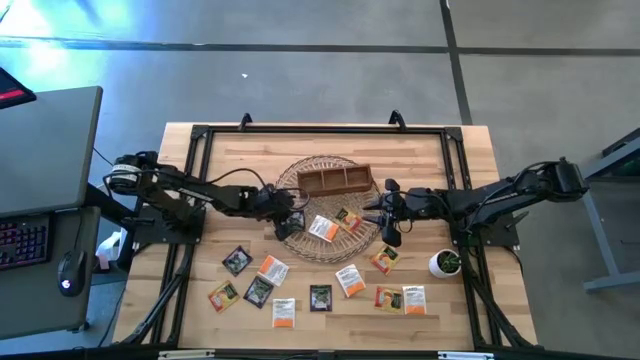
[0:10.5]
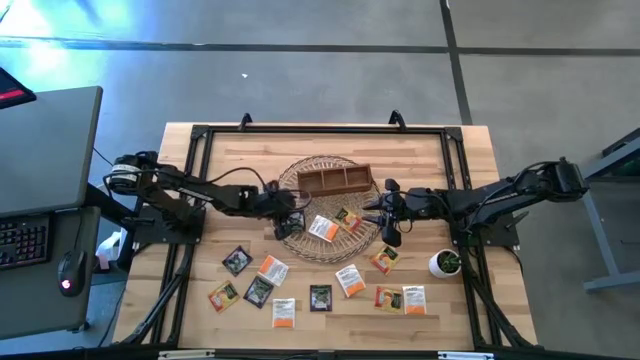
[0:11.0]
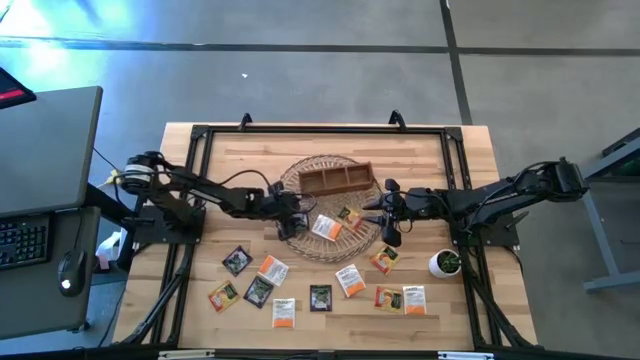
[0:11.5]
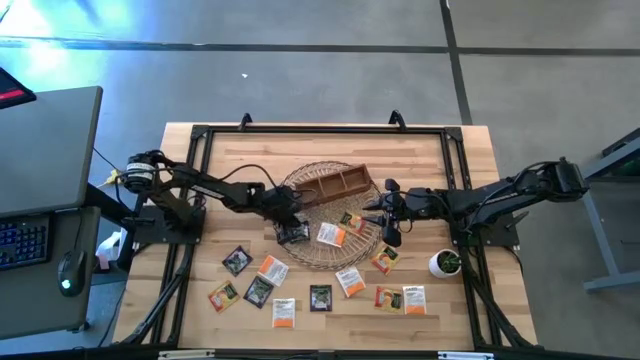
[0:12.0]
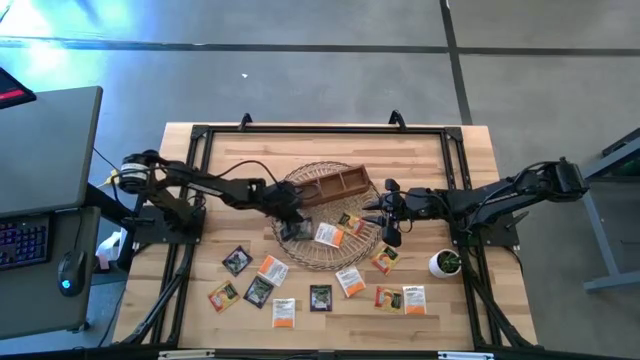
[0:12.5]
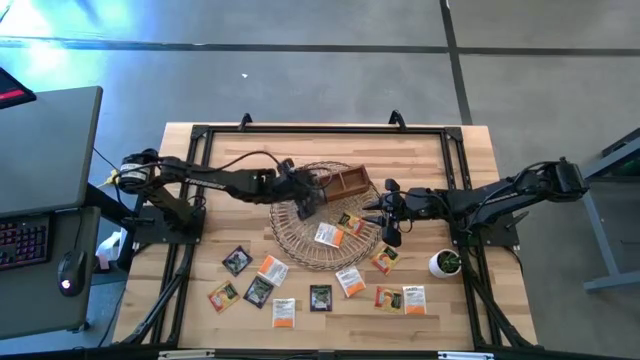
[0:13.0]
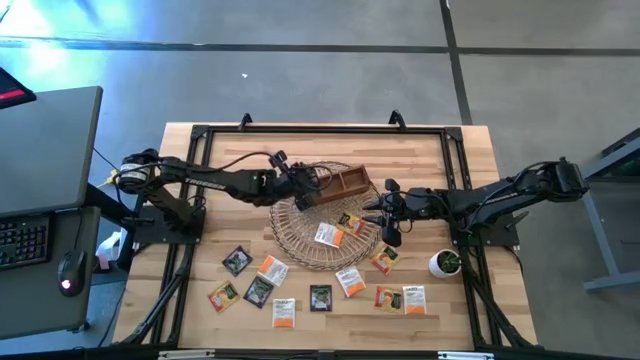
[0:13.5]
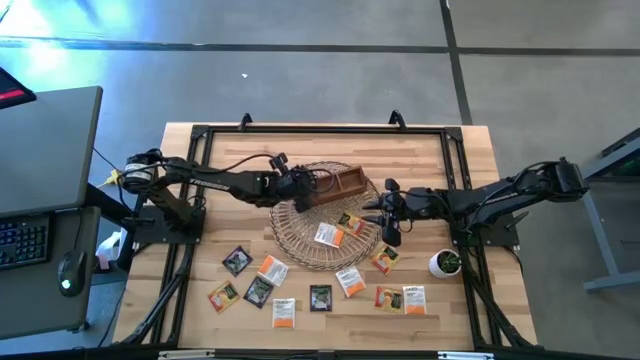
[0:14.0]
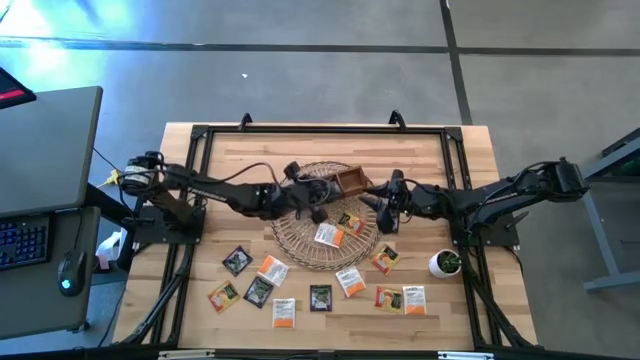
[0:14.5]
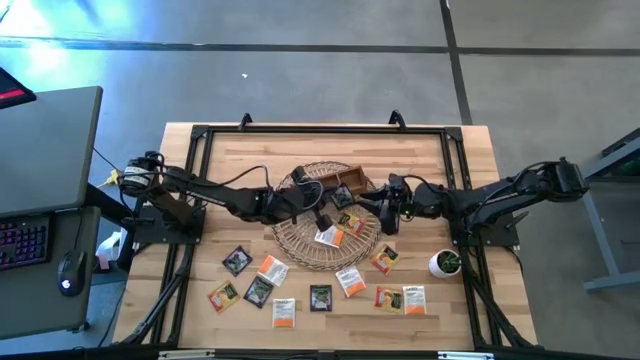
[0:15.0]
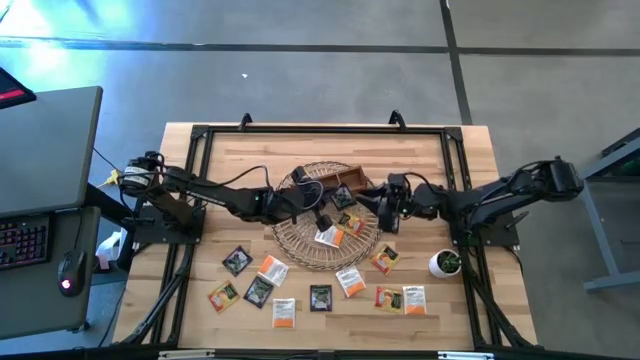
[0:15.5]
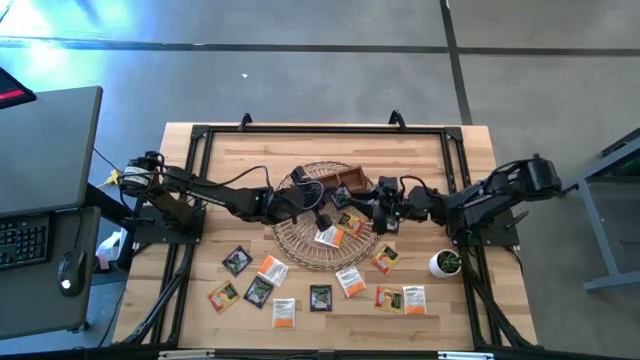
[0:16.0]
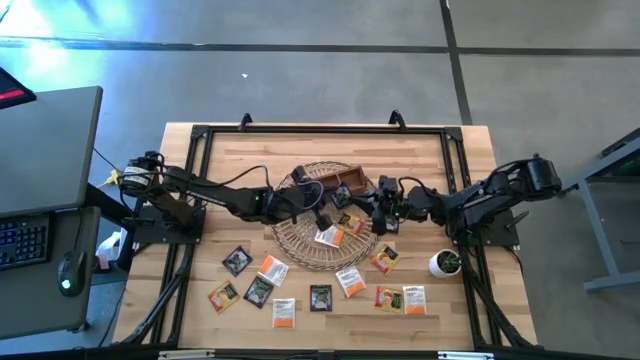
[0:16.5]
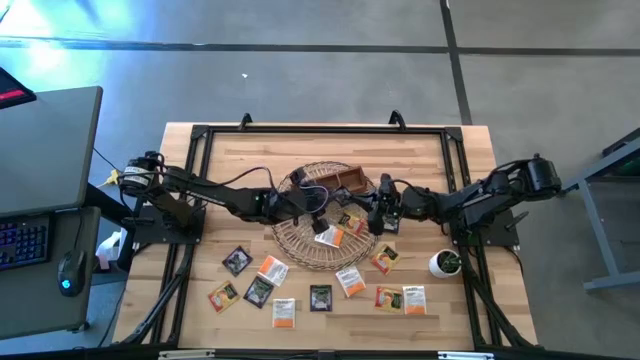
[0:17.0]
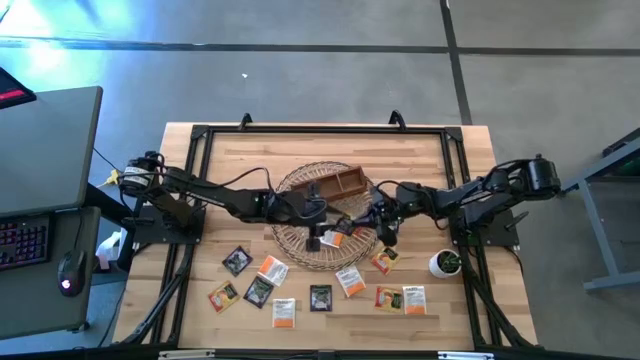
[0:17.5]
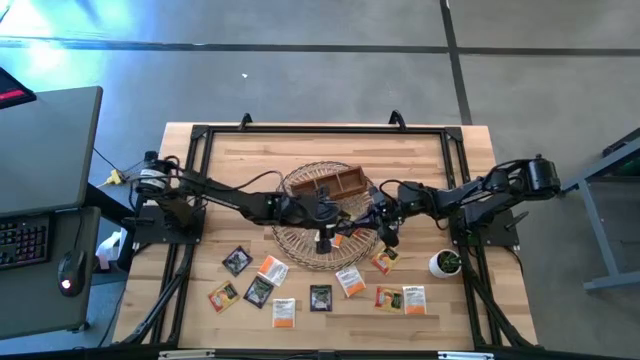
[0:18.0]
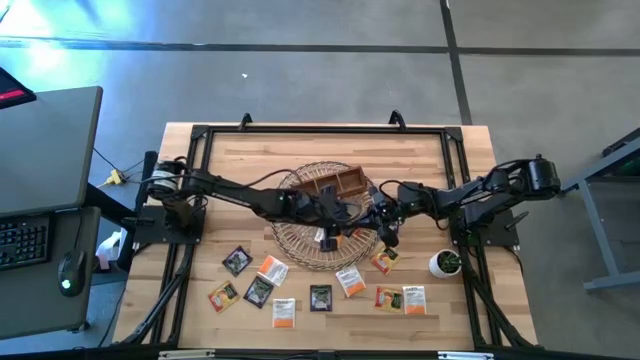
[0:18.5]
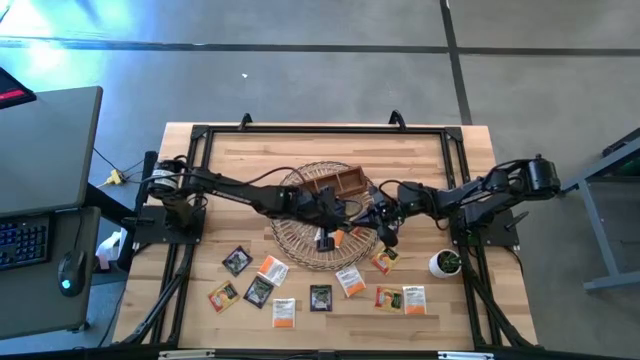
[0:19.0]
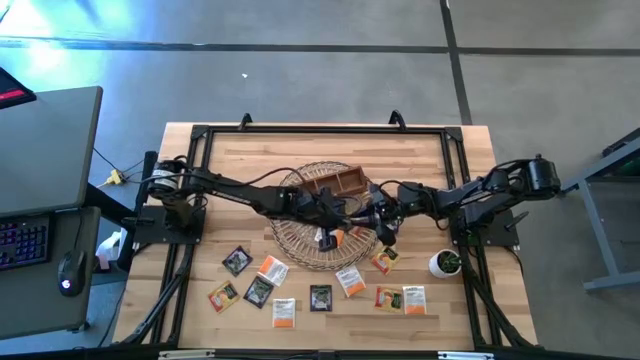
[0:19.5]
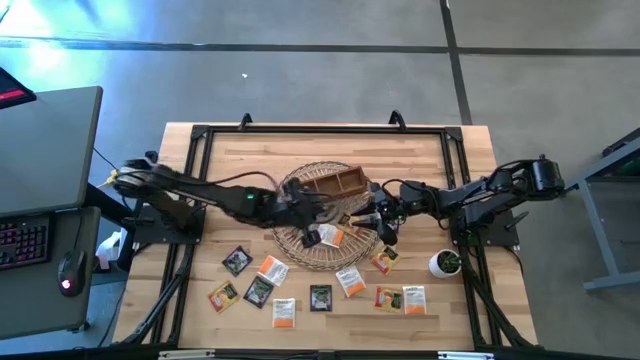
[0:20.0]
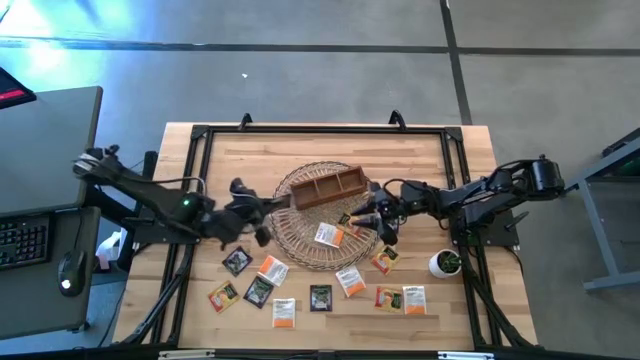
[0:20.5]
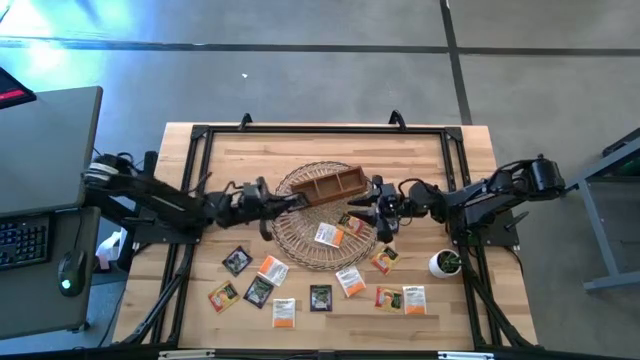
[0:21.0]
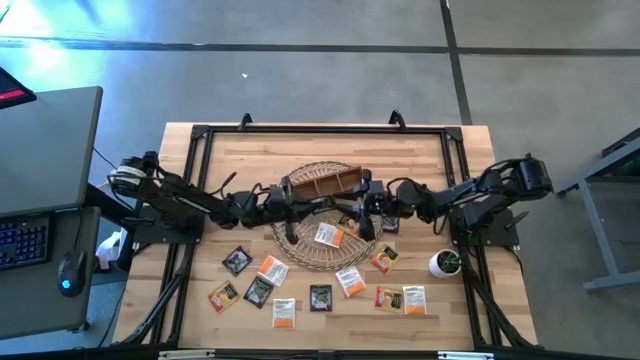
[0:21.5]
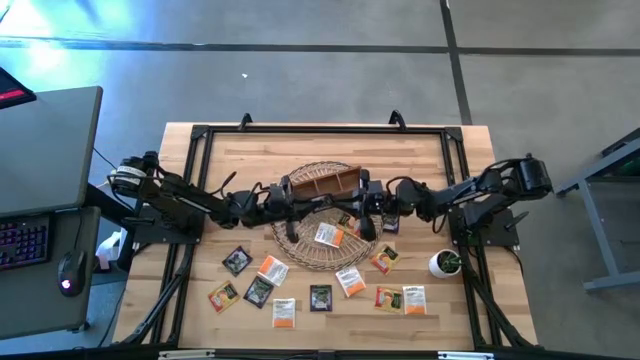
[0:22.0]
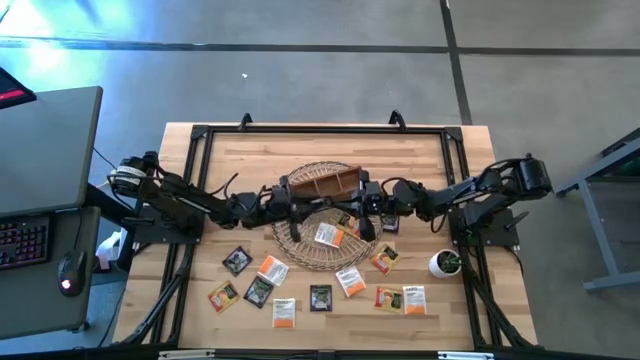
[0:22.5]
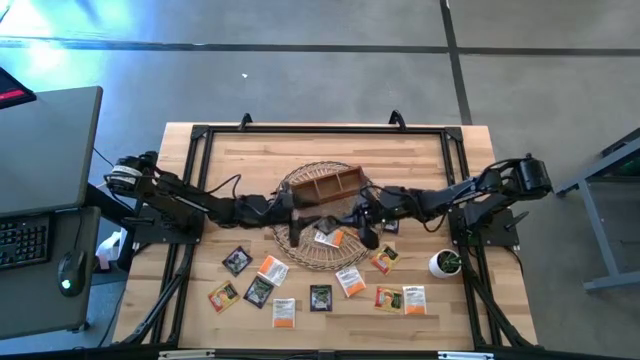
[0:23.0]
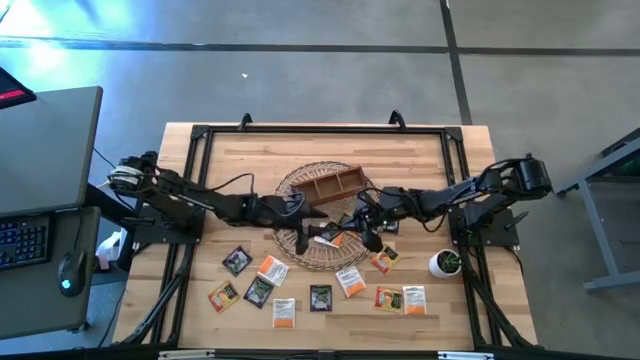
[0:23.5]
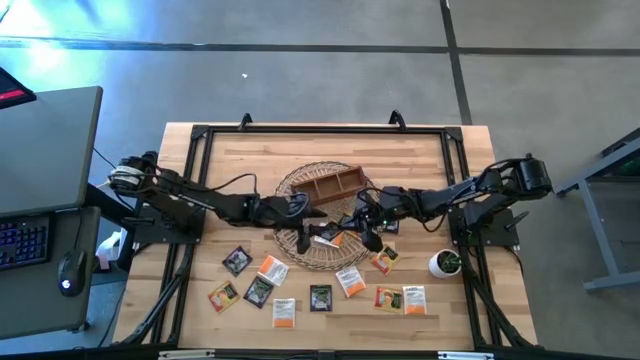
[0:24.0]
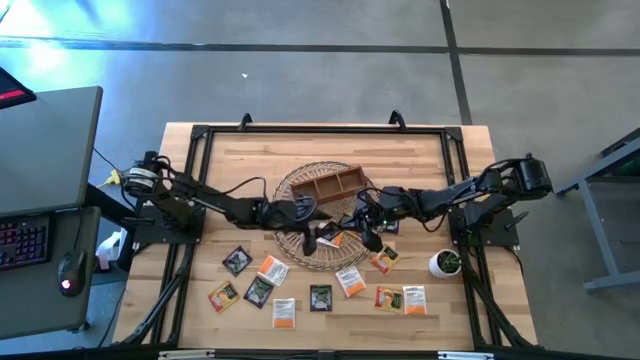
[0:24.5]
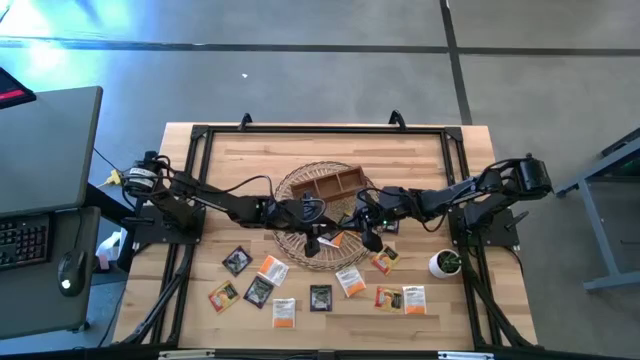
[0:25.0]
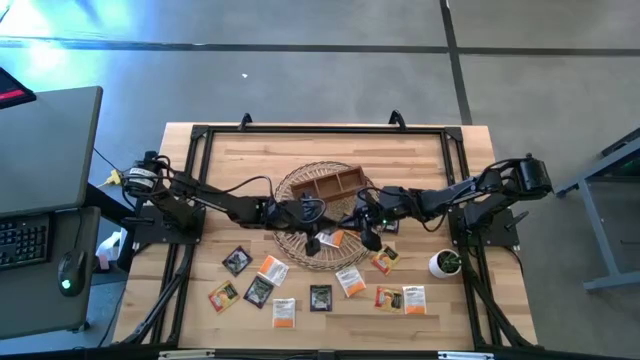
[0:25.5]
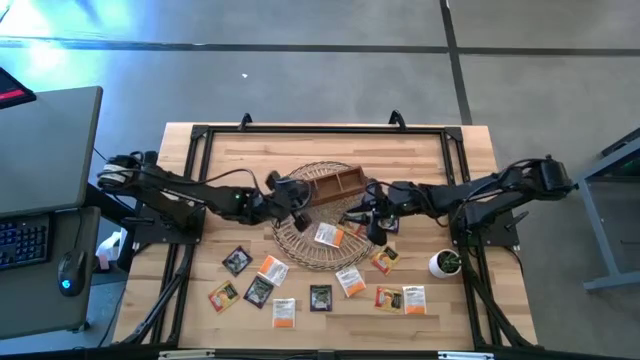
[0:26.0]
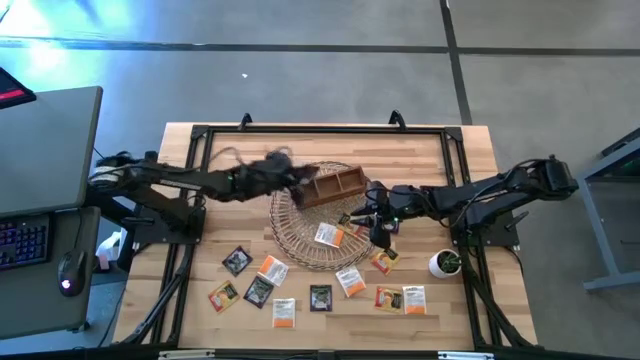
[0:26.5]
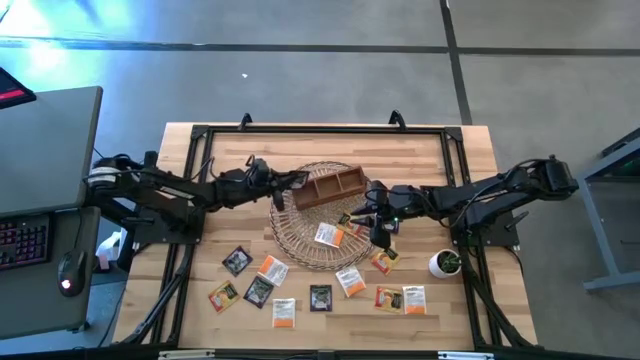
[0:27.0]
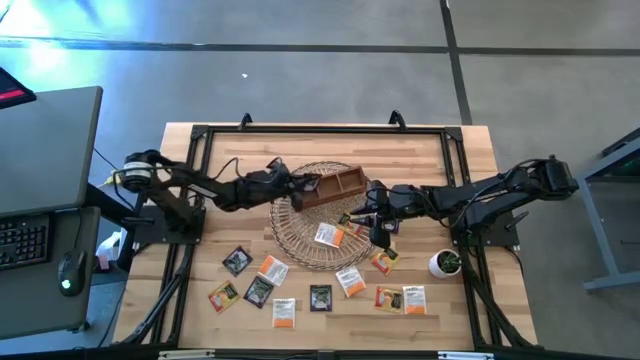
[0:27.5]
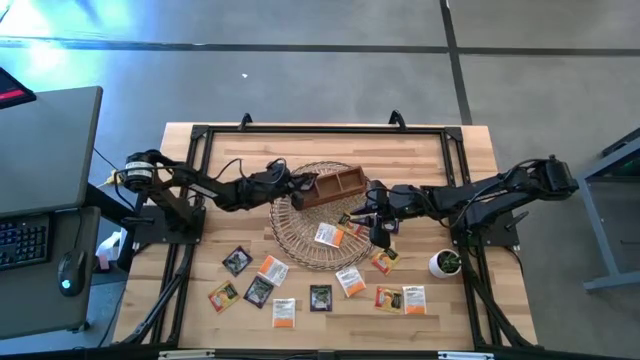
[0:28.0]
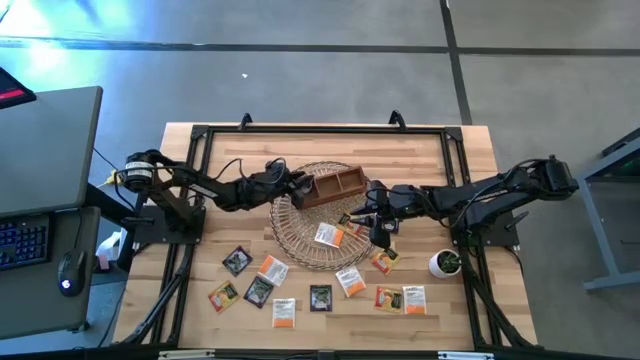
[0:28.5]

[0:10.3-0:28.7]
Task: Pick & Place Tea
Put the violet tea bag into the left section of the brown wooden organizer
